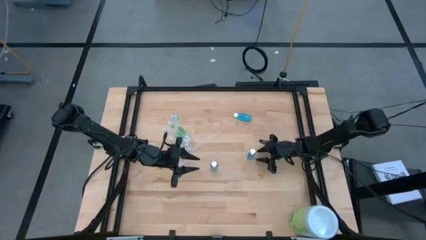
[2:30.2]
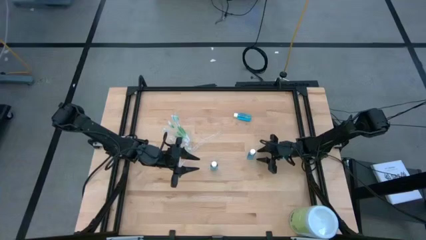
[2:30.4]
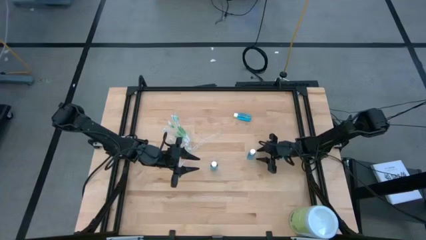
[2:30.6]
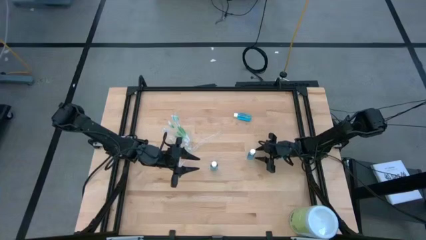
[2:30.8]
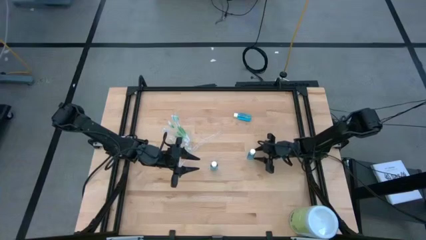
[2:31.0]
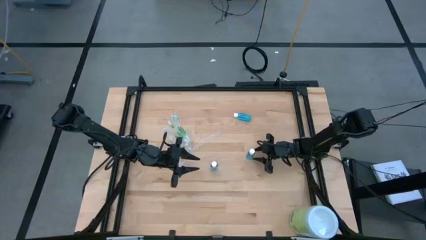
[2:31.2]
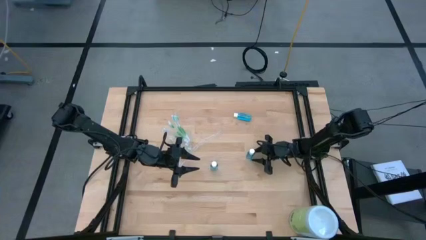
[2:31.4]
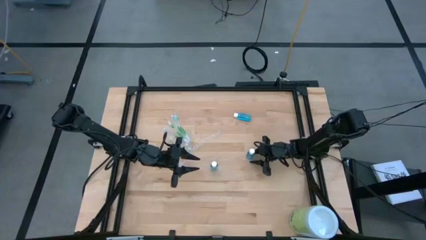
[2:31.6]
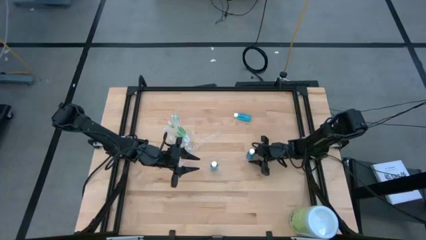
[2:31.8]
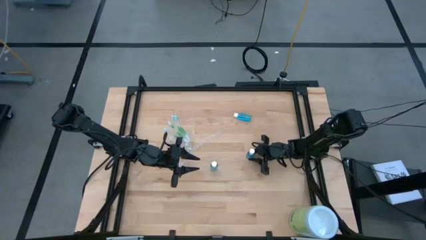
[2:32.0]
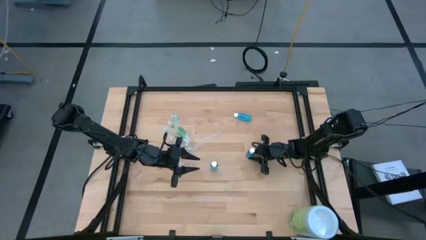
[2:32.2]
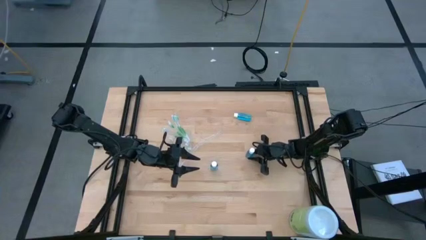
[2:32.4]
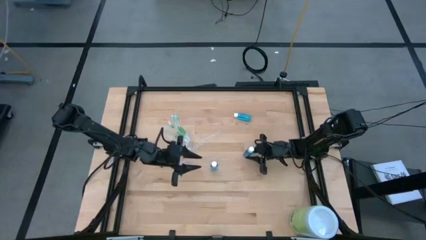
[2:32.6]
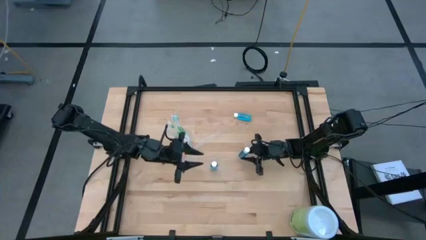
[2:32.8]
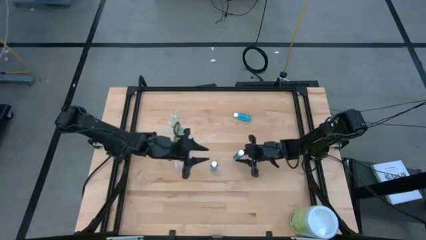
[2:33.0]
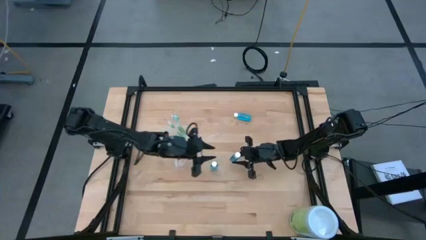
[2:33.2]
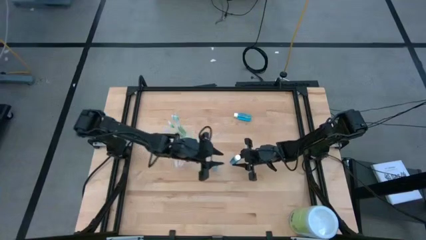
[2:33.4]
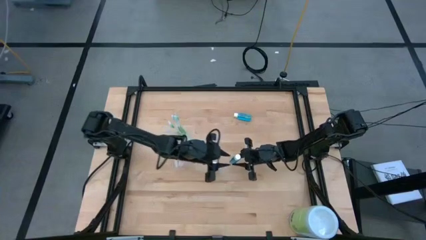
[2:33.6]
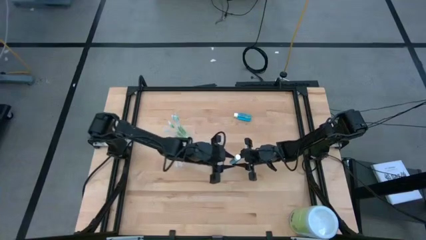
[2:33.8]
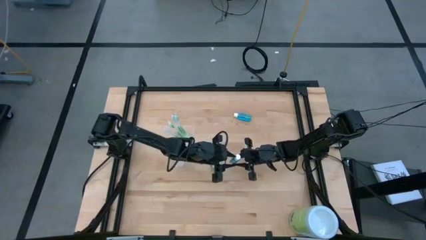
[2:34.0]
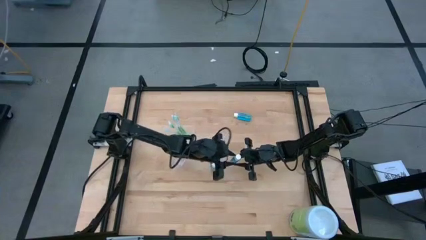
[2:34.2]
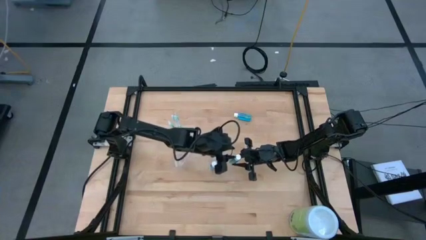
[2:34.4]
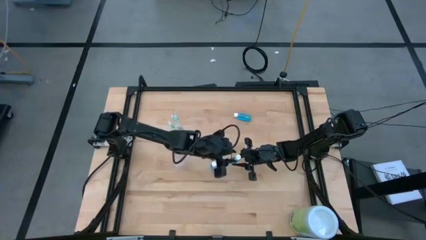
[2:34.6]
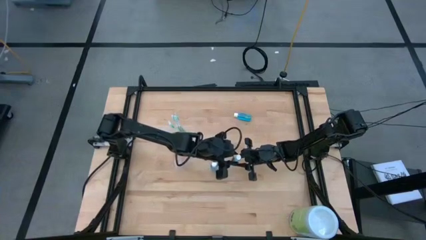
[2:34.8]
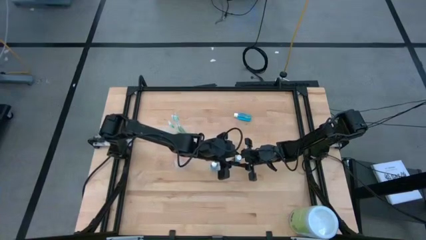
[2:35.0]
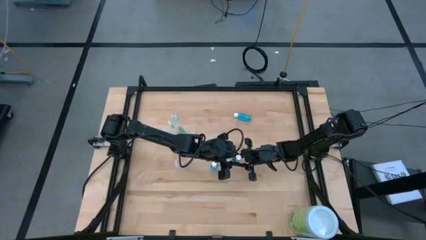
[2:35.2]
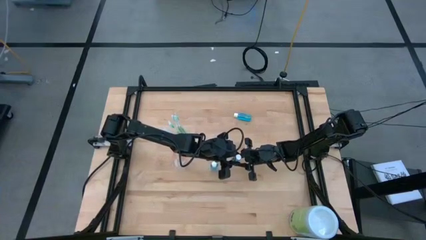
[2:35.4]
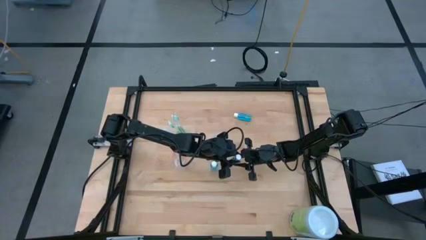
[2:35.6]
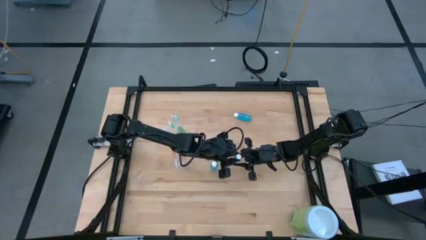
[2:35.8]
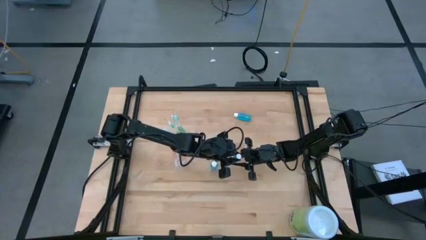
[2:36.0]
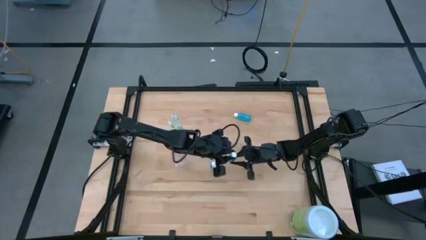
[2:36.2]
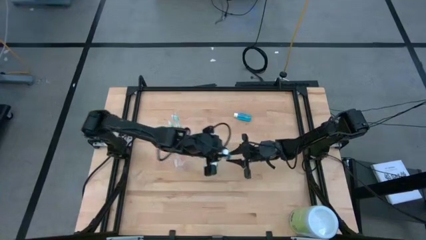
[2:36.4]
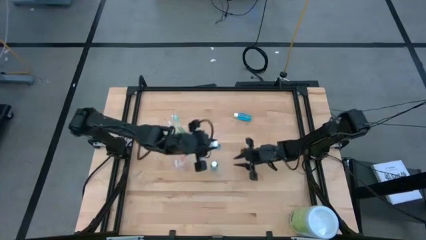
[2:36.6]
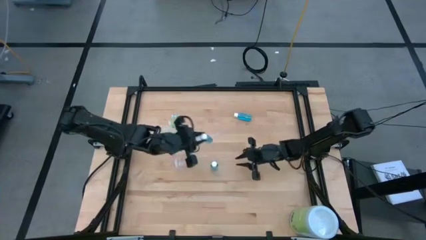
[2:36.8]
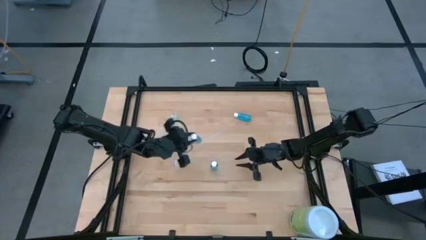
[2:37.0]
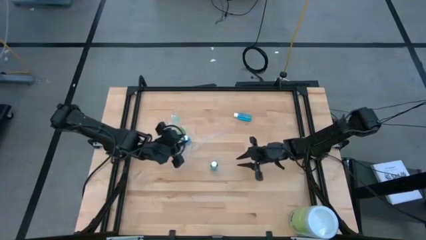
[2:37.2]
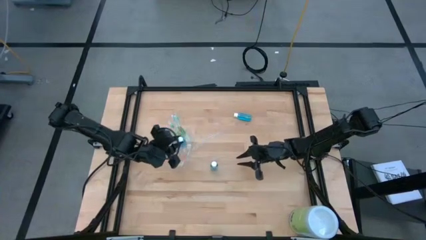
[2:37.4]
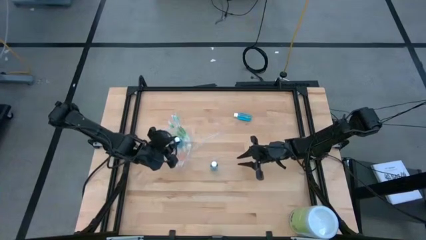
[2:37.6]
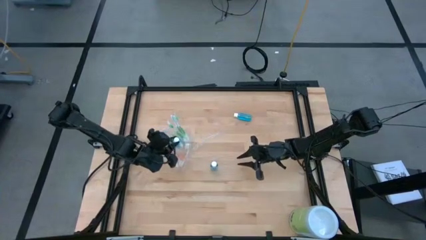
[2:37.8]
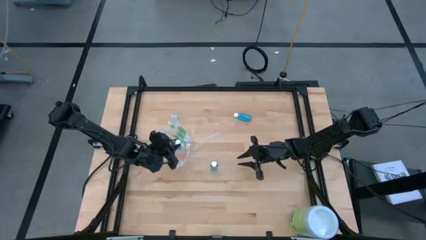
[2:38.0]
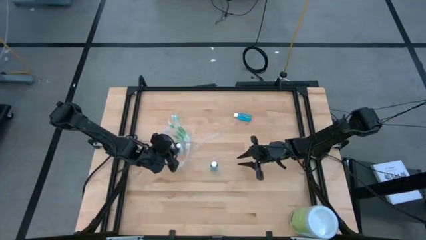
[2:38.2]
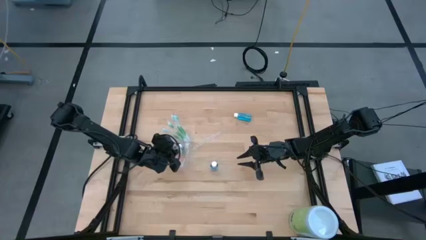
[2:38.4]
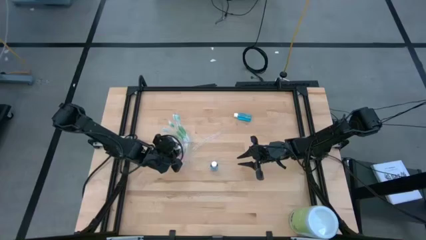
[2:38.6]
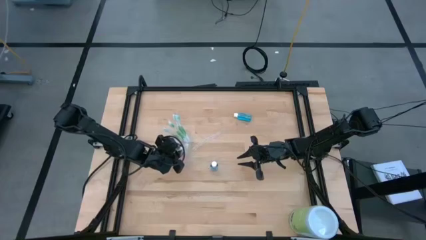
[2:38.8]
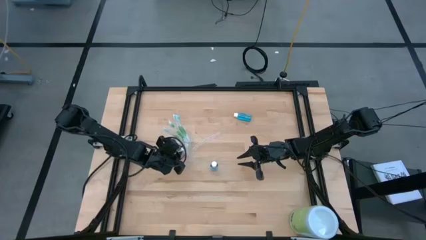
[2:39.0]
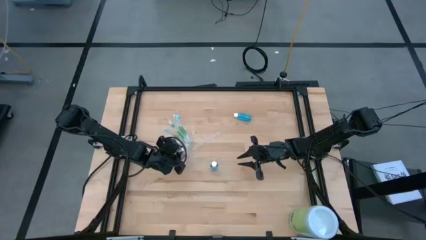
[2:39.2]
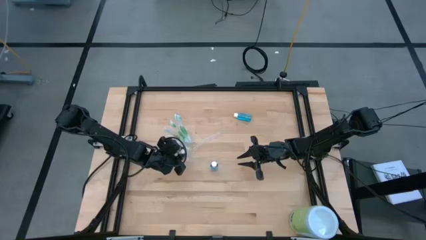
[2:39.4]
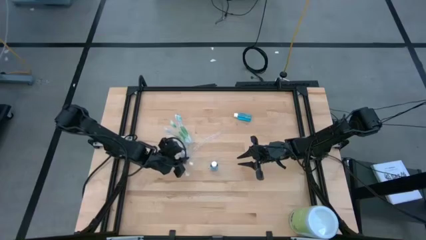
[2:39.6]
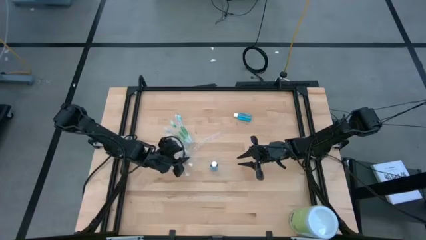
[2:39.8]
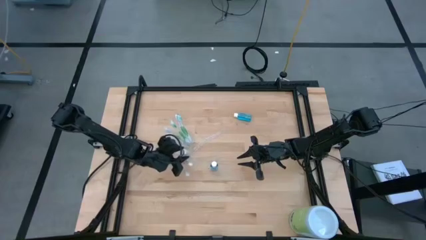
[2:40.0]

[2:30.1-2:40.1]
Task: Pick & Place toothbrushing station
Put the blue mouthwash into the middle section of the transparent organizer

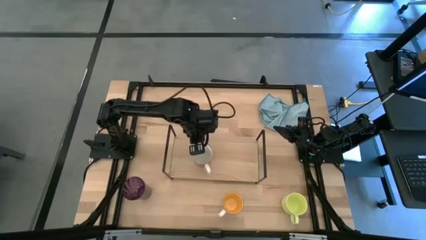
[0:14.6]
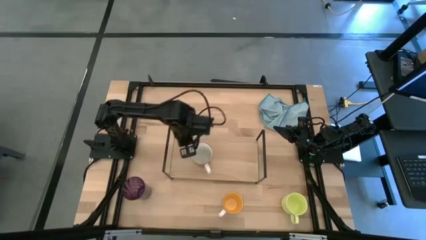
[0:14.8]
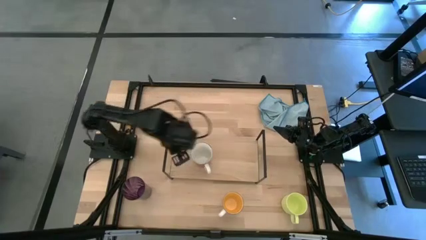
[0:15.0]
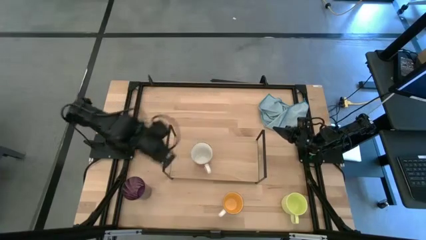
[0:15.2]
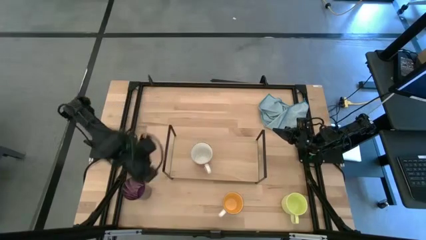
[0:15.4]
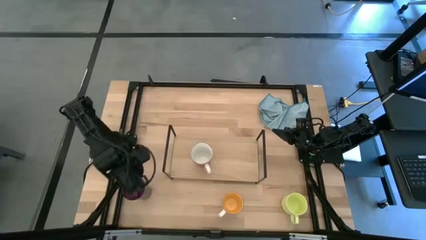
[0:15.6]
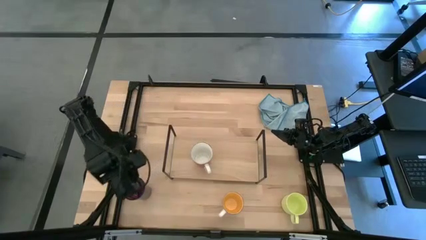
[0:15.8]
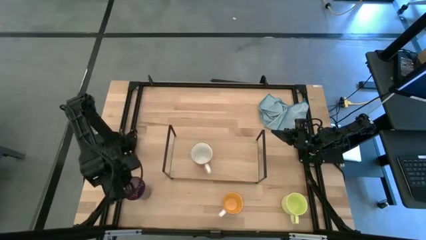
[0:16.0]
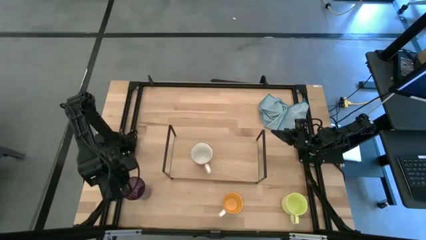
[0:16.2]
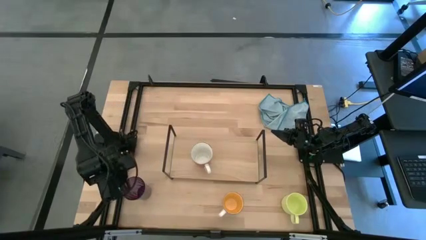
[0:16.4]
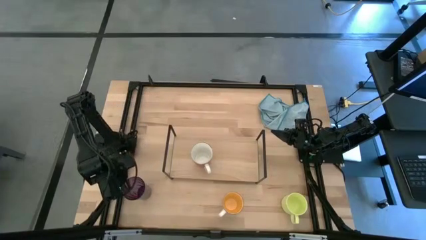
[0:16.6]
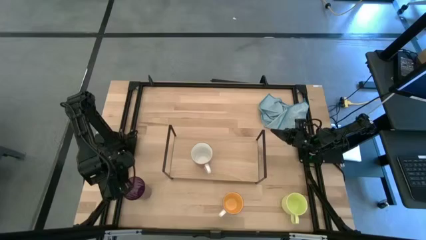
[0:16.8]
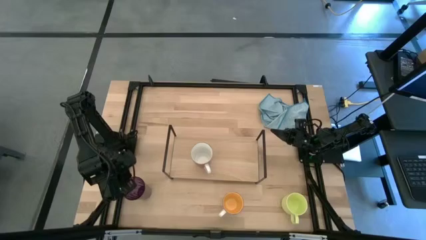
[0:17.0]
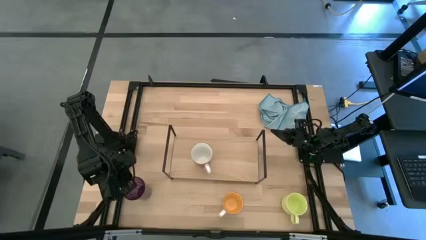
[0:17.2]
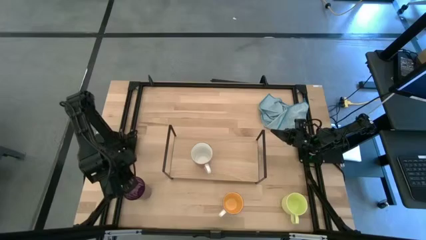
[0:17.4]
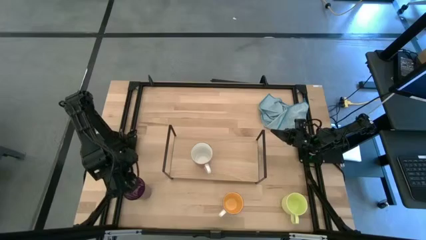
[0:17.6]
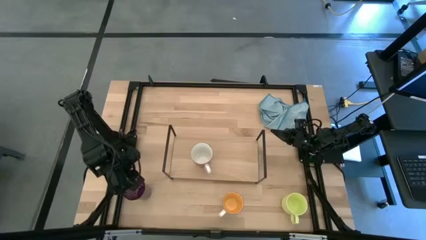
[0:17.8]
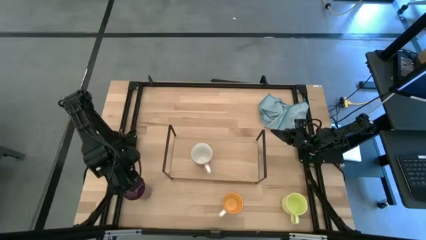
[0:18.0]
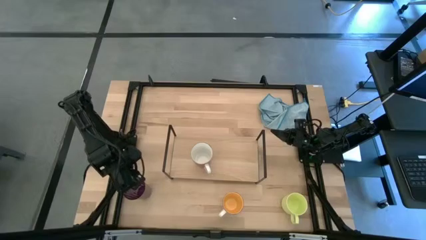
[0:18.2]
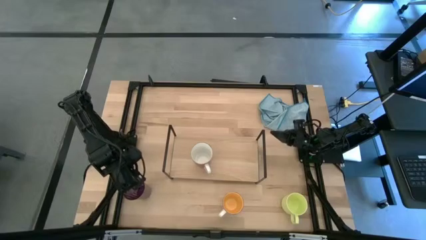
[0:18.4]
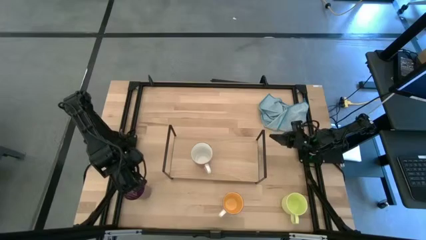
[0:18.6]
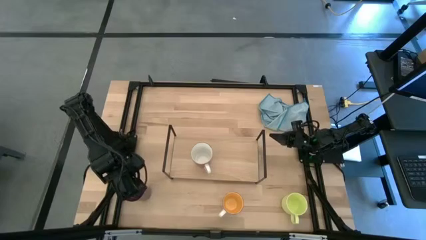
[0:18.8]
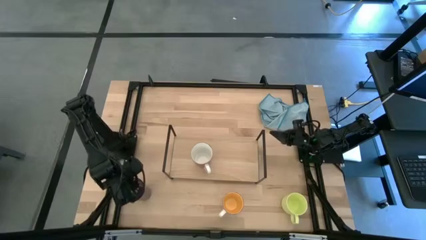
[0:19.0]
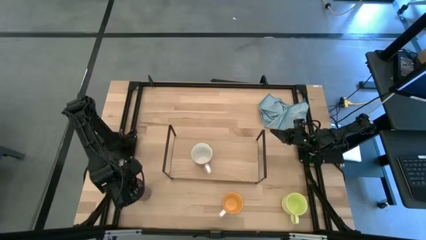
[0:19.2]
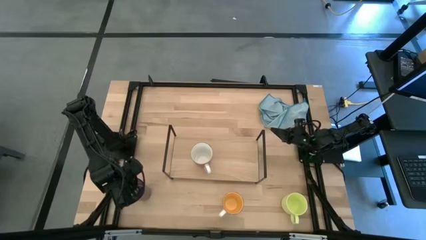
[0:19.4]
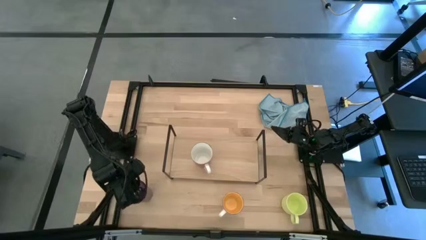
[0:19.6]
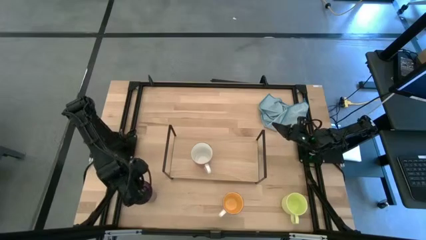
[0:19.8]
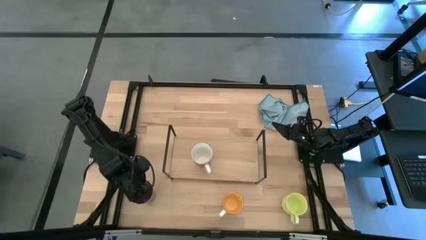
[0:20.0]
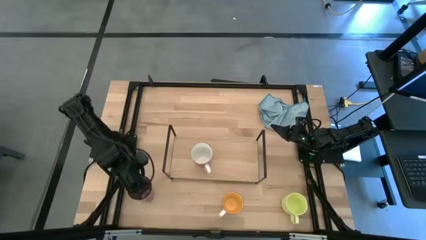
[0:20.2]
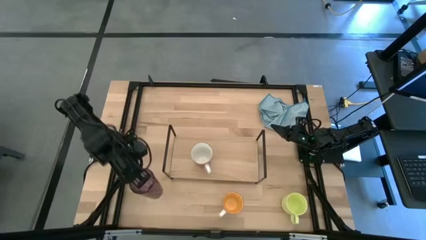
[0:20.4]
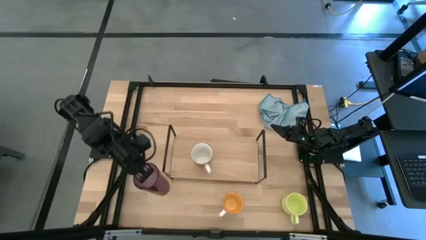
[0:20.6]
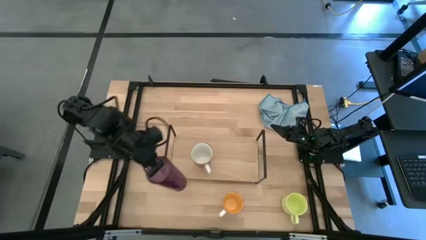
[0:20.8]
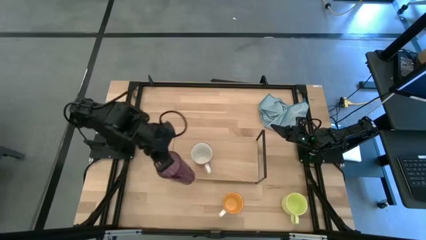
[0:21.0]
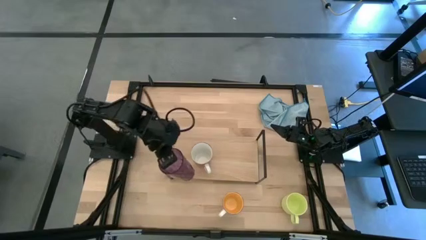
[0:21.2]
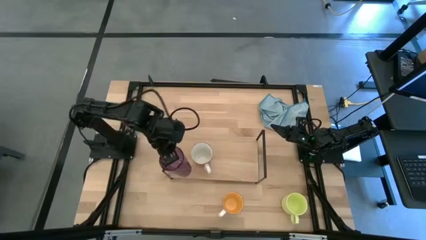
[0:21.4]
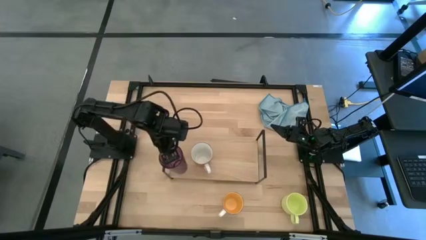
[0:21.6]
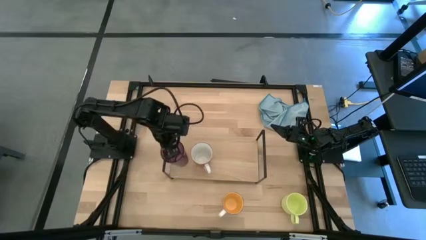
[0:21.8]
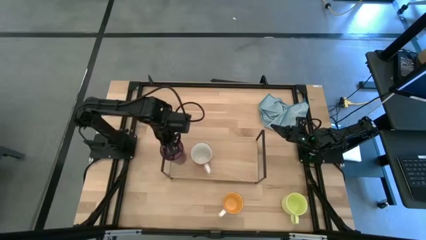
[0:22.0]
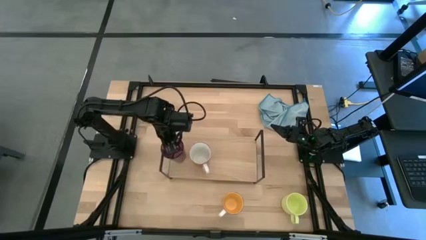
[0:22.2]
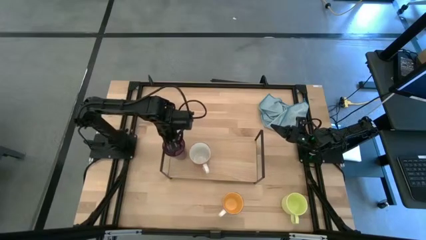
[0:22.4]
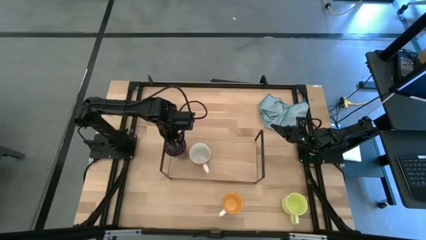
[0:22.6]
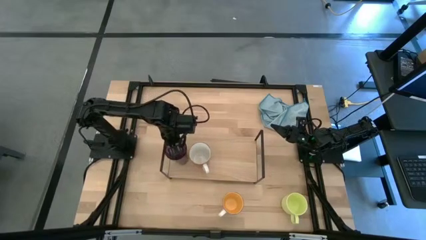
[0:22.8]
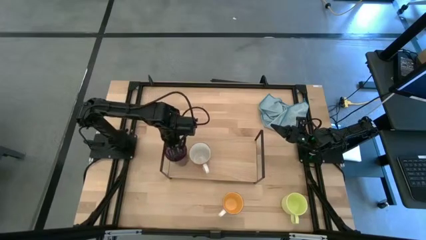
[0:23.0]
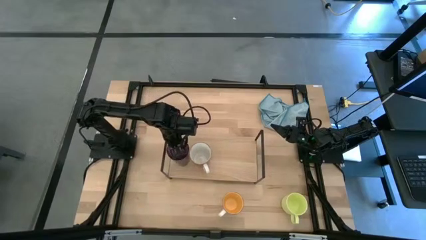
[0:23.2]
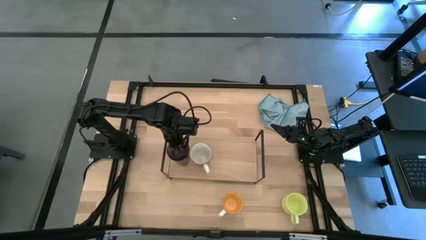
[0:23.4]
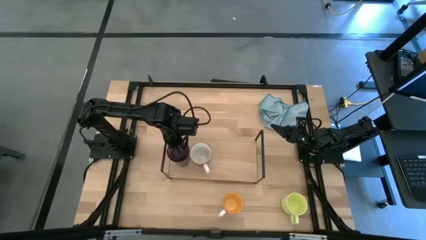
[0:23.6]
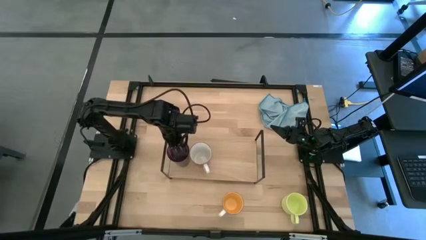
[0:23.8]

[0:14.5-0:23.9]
Task: Stack small to large cups/mugs on shelf
Put the purple cup on the shelf
